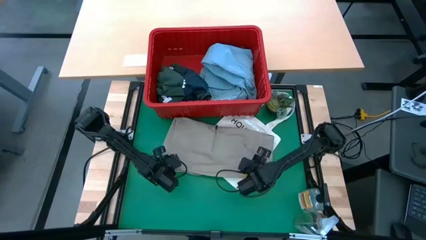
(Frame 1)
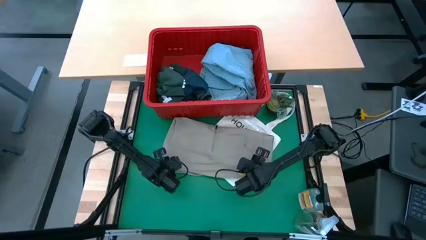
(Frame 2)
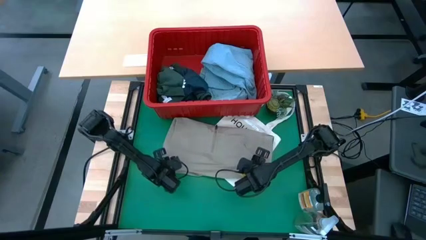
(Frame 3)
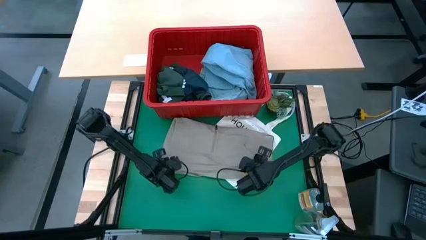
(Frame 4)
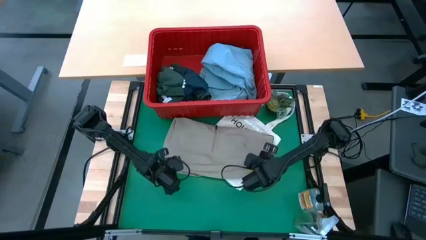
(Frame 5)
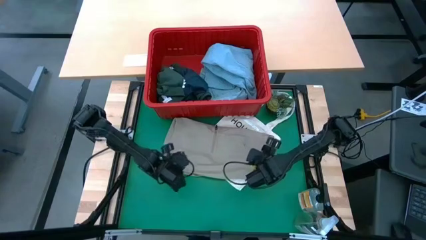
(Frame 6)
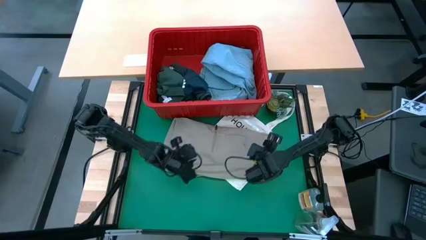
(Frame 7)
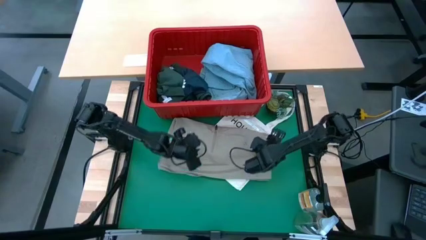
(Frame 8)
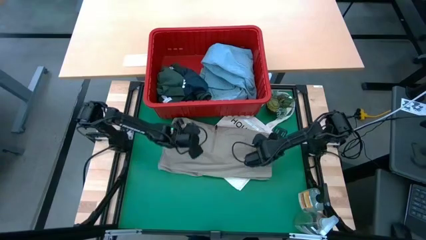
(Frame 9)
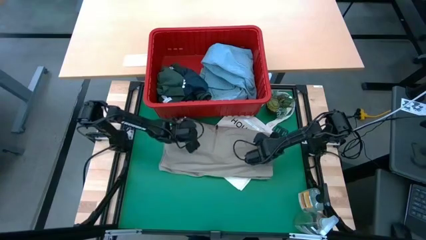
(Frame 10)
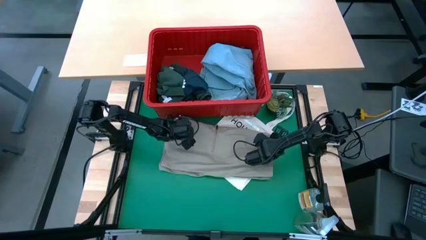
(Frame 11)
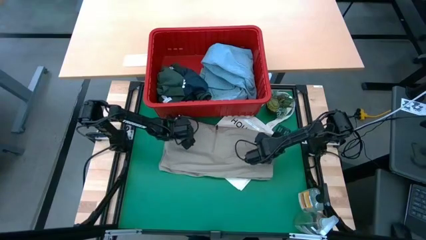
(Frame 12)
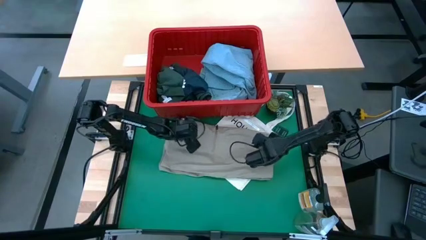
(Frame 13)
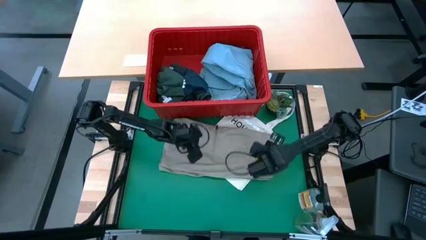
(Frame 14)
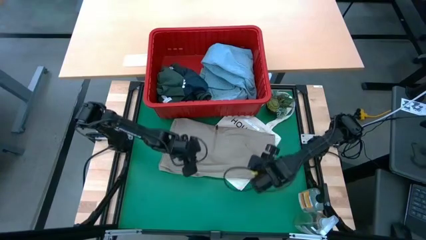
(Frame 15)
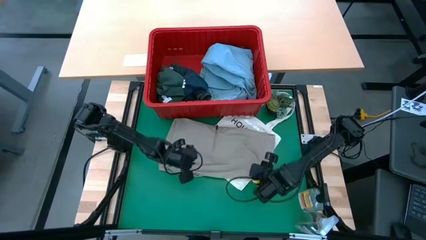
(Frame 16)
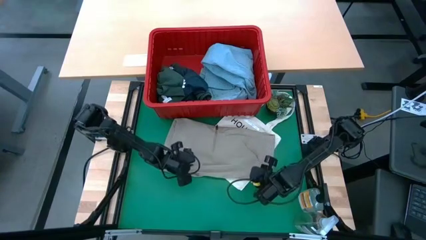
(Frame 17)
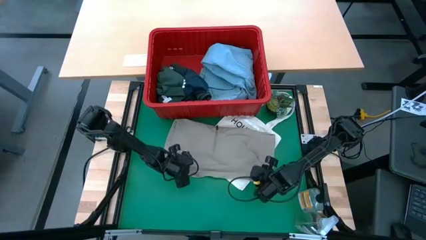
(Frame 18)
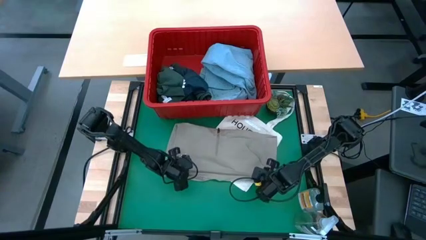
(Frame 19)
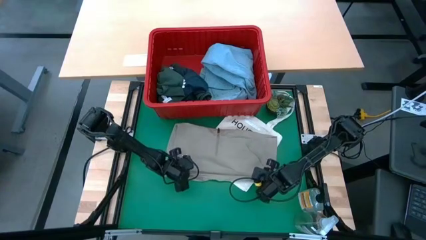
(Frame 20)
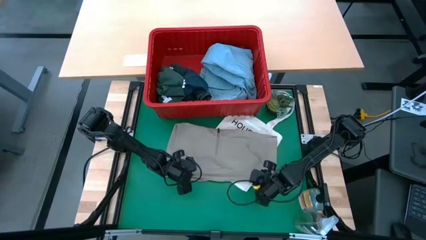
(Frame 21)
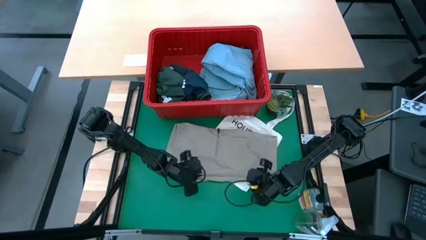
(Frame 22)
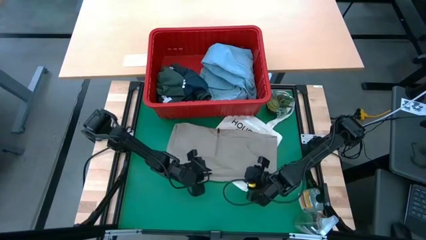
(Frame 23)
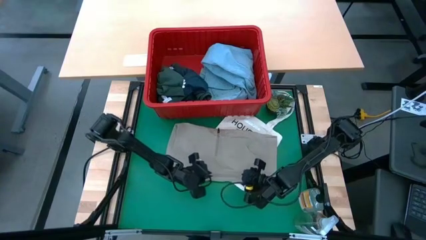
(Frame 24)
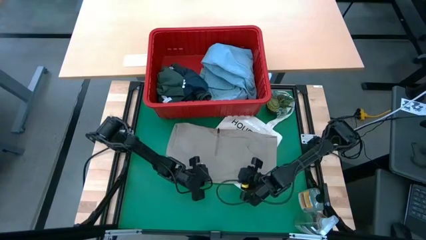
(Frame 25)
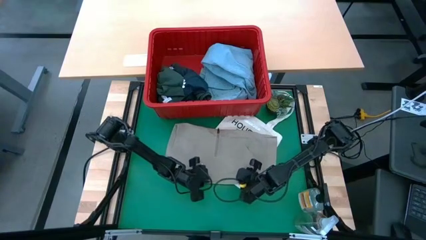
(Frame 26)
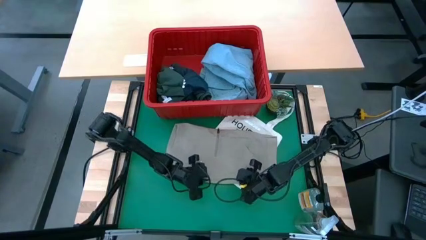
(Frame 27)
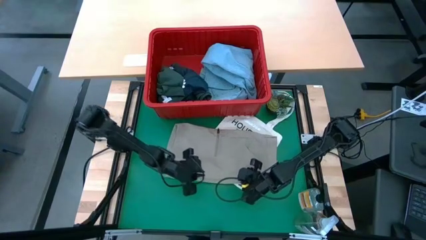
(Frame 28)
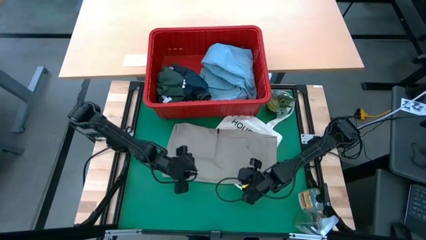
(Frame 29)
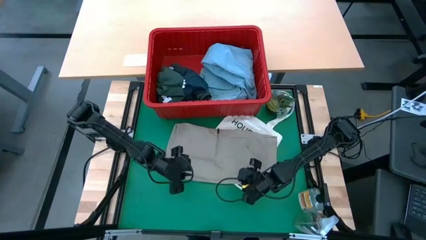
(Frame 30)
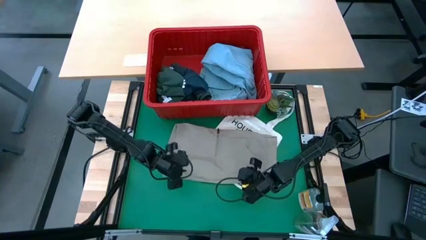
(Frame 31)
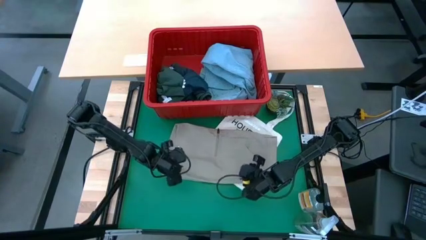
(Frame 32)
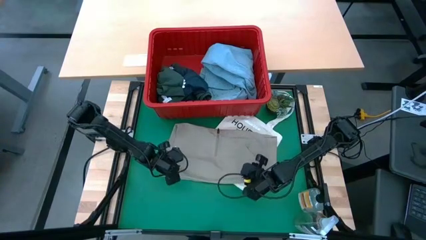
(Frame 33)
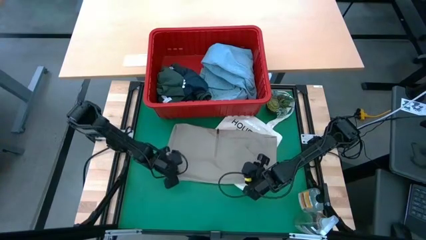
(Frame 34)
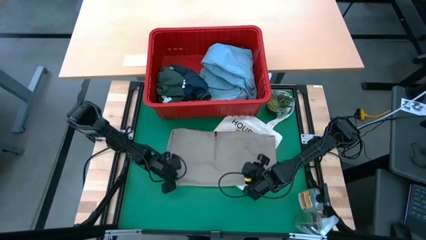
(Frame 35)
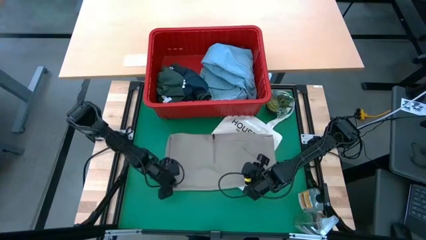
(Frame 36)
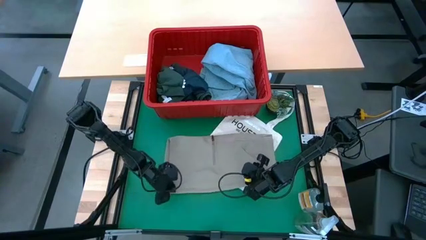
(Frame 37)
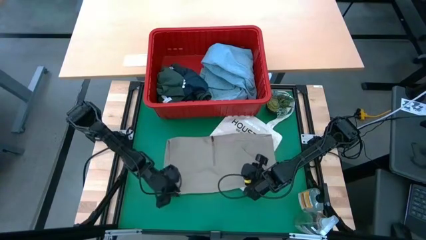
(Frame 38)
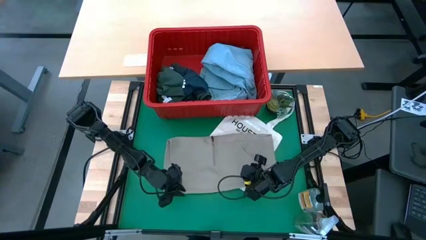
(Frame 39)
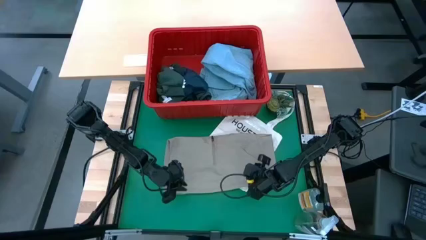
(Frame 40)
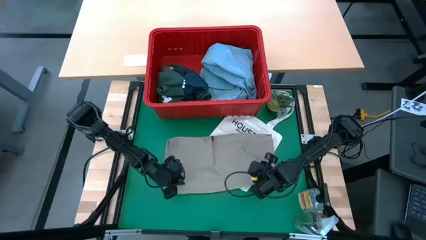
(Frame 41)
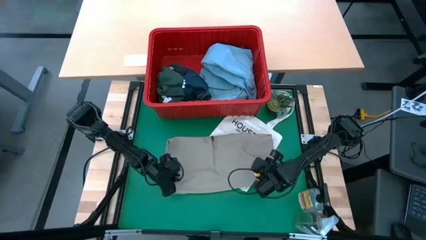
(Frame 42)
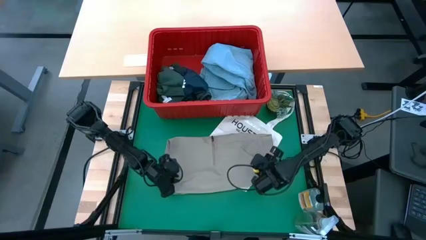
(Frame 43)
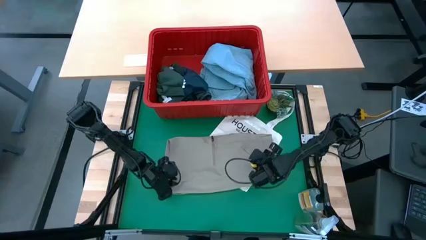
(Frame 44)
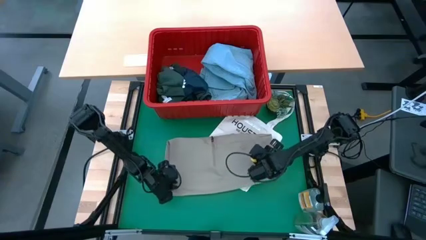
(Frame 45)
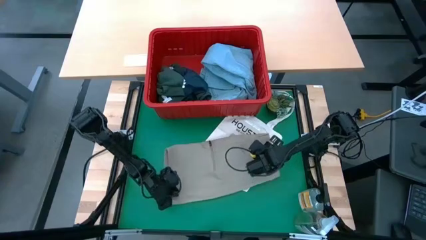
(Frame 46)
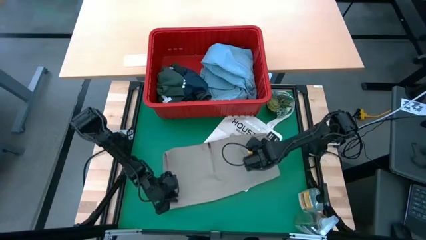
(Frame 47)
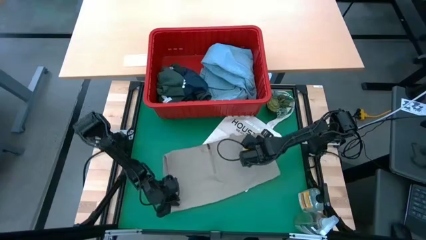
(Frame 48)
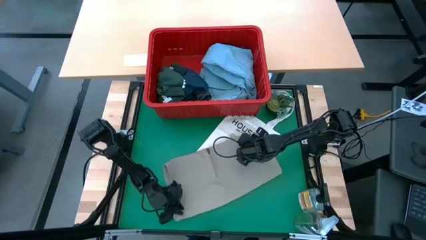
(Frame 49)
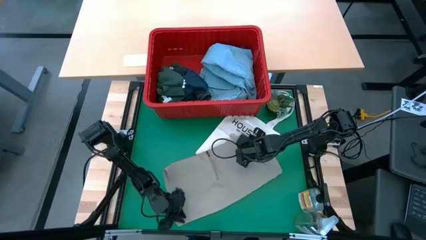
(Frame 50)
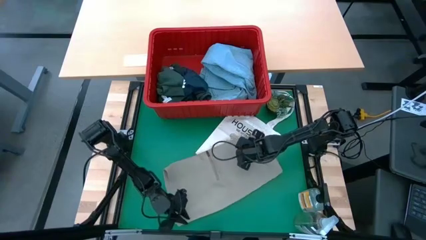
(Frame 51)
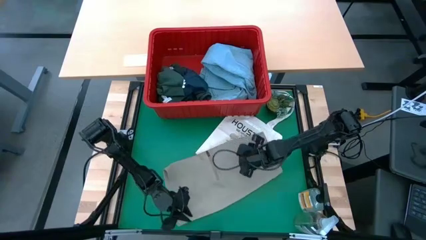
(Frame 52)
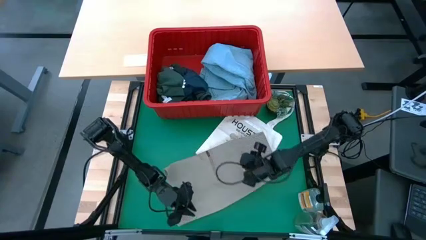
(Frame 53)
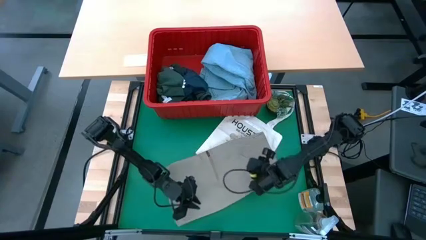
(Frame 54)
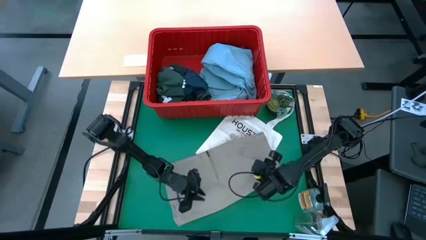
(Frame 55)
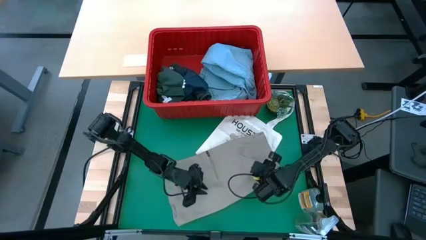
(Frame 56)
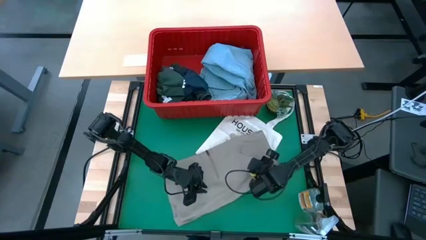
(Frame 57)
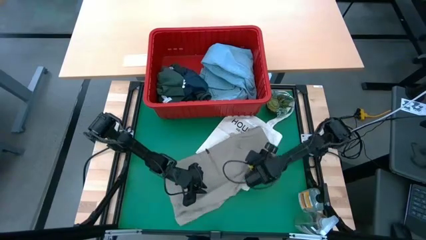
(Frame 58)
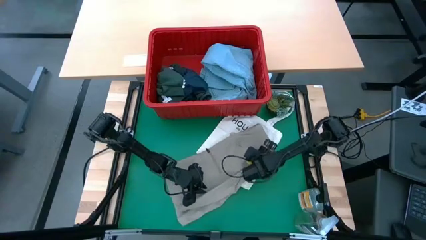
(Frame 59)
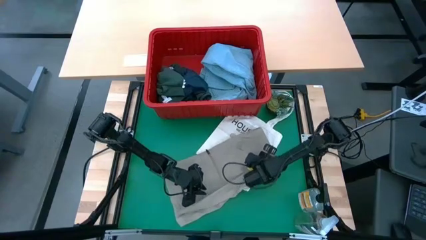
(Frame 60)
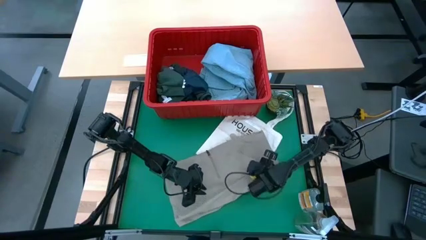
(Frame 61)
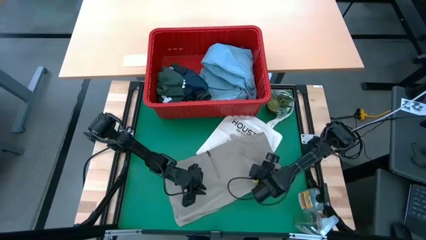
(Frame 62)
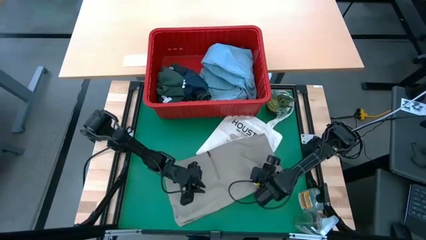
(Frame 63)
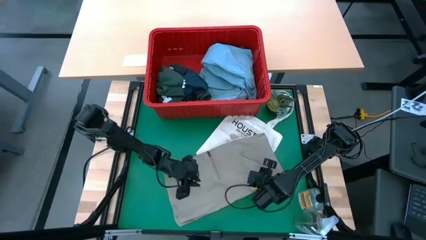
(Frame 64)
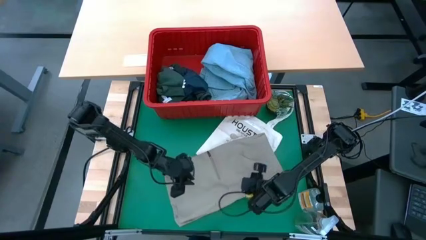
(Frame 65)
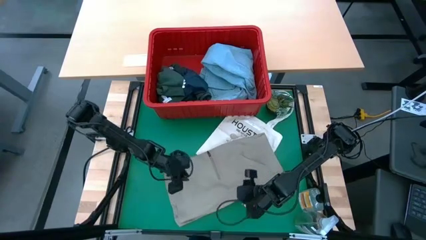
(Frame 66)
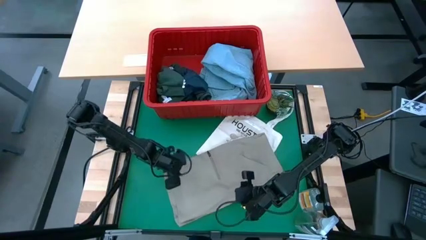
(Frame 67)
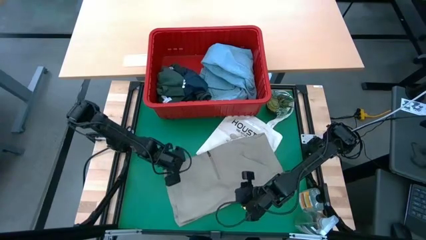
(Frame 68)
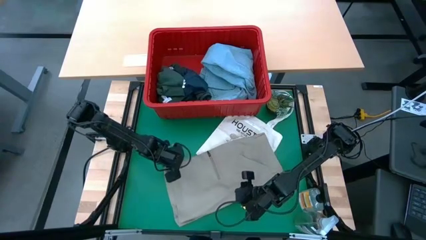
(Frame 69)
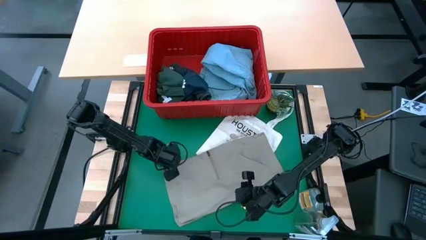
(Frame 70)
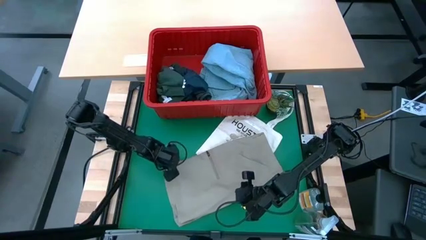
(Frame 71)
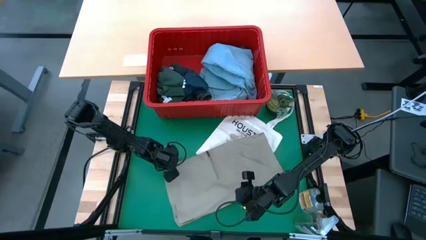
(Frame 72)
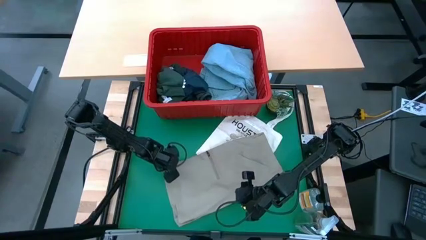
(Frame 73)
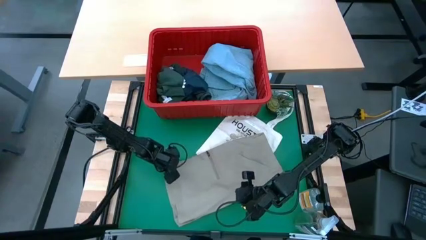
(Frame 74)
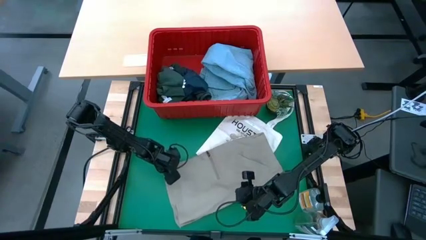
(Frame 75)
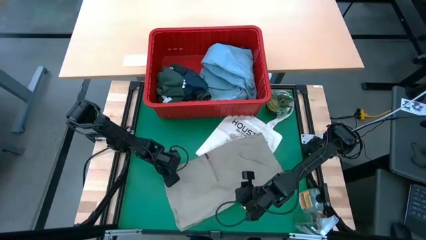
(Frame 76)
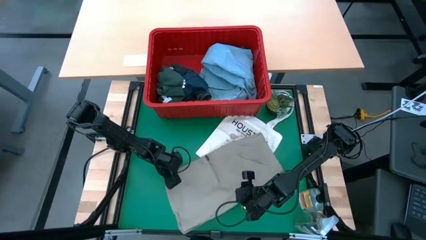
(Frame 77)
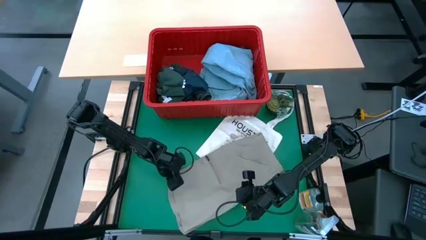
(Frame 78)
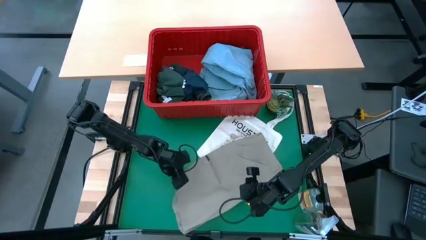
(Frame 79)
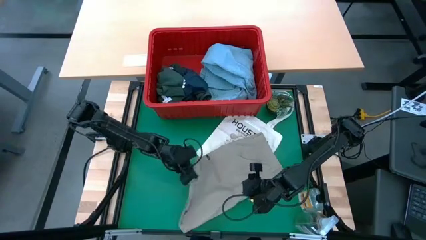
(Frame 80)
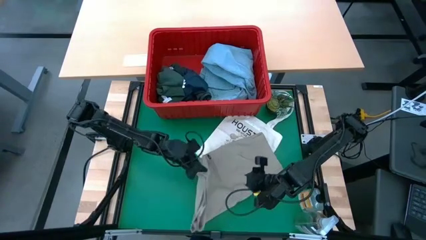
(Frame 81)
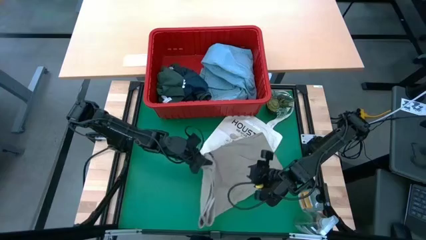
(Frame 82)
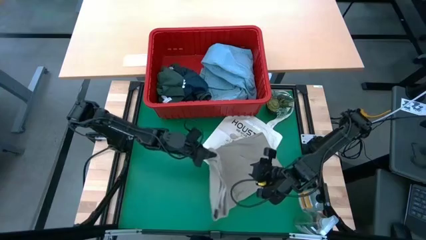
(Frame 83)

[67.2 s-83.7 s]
Task: Fold Laundry from Bin
Fold the brown shorts
